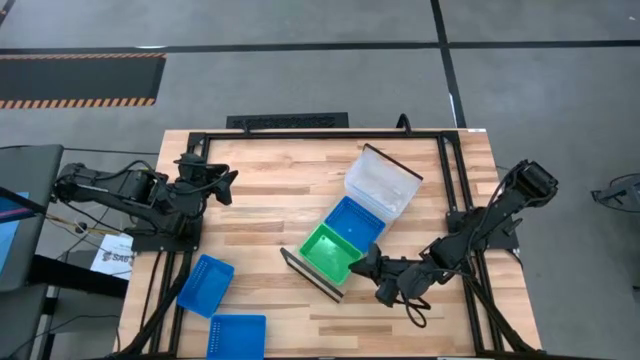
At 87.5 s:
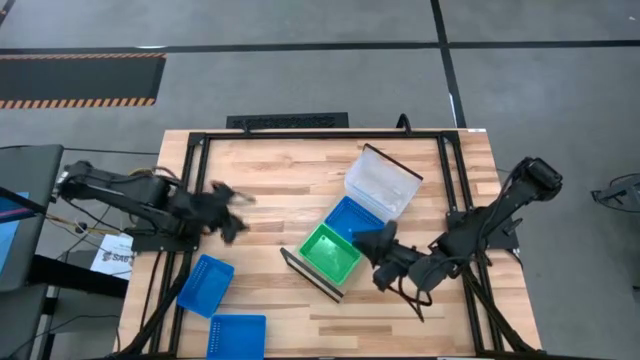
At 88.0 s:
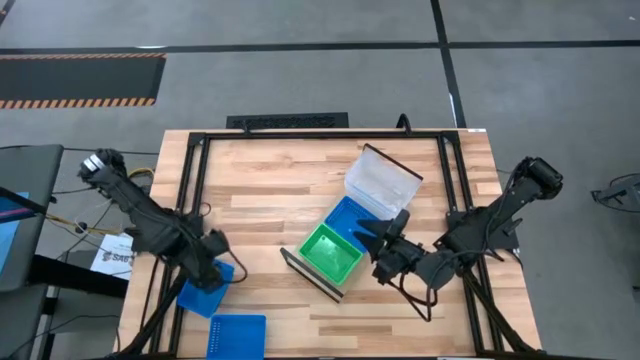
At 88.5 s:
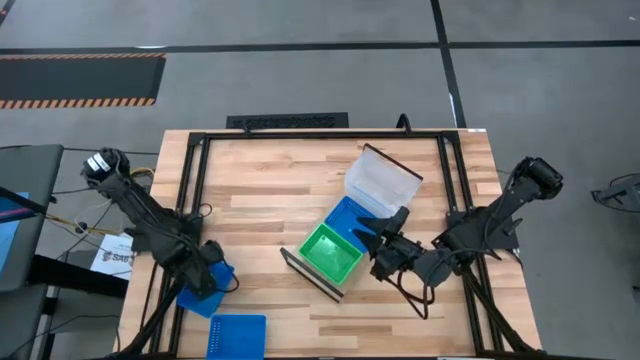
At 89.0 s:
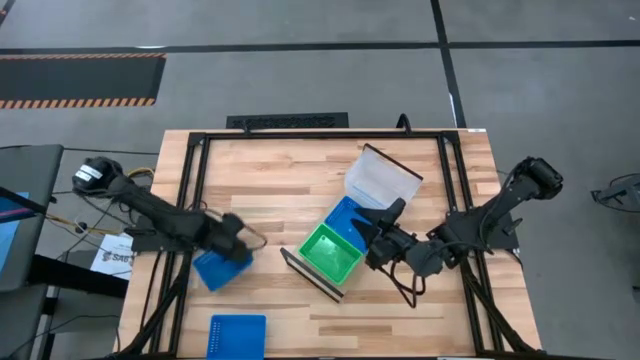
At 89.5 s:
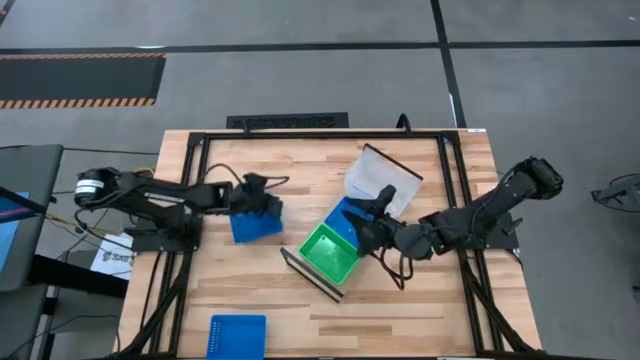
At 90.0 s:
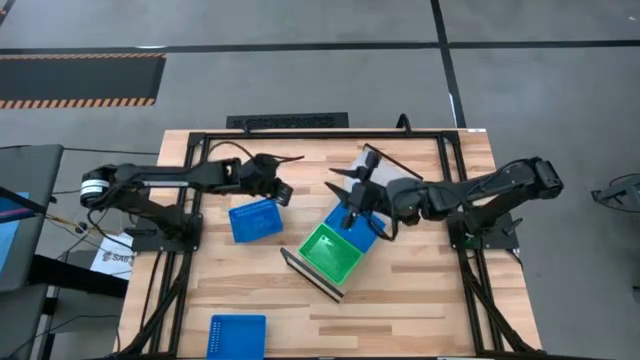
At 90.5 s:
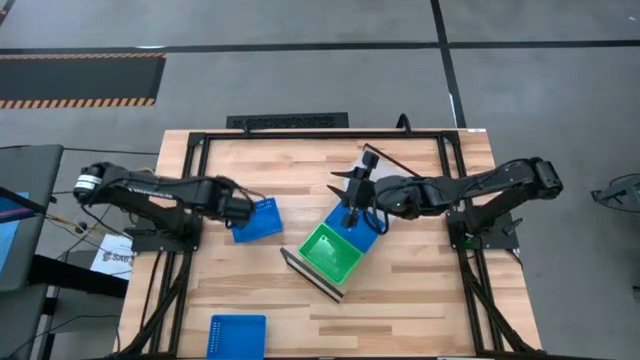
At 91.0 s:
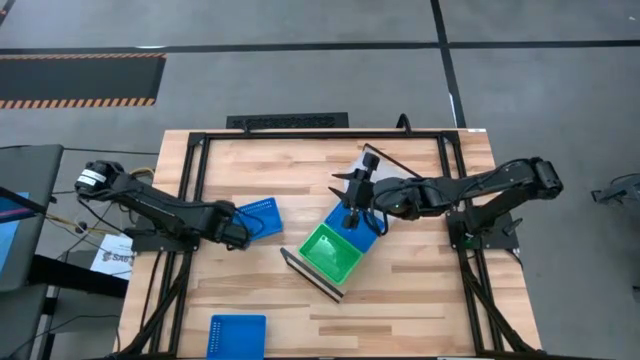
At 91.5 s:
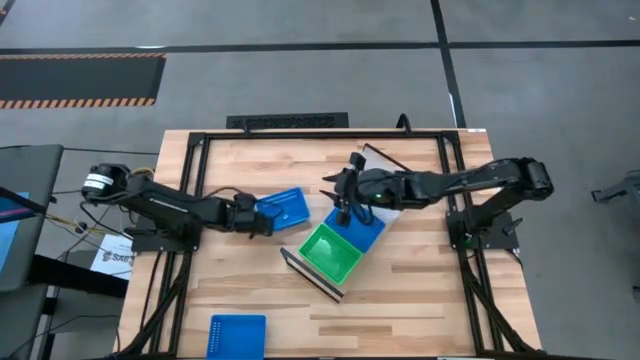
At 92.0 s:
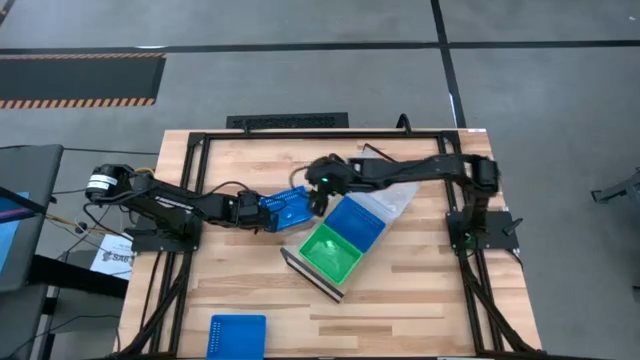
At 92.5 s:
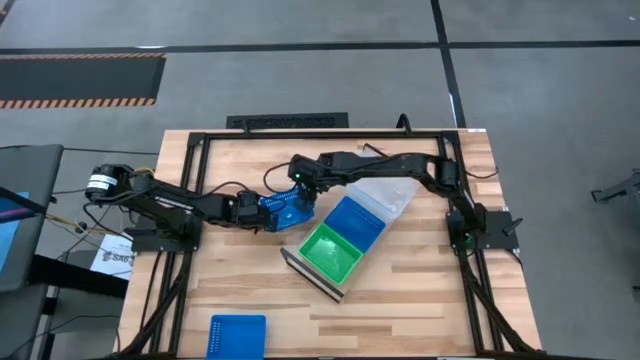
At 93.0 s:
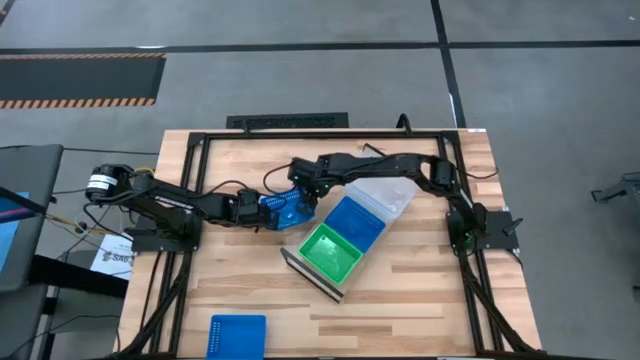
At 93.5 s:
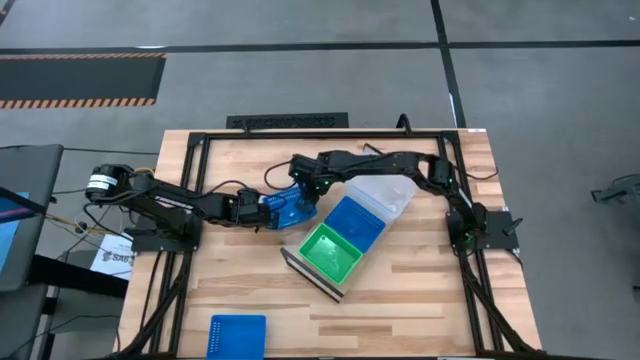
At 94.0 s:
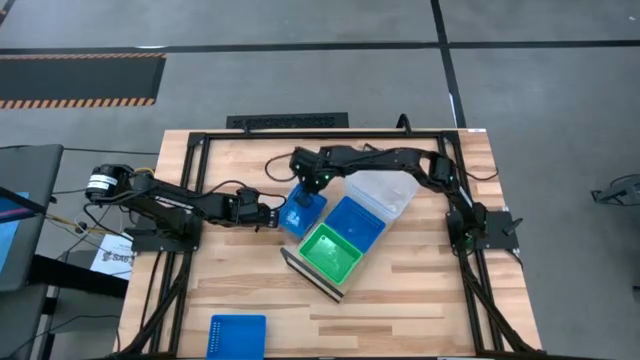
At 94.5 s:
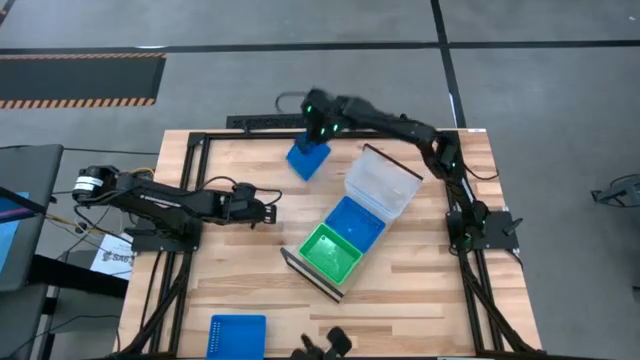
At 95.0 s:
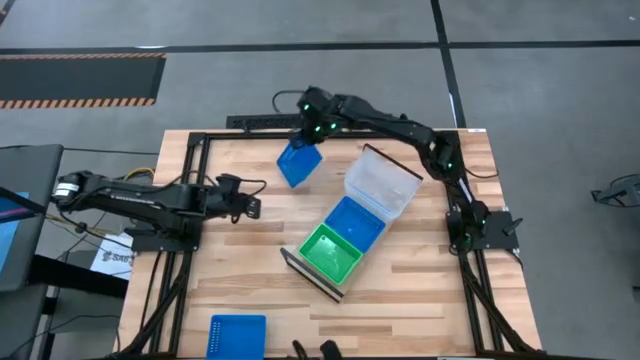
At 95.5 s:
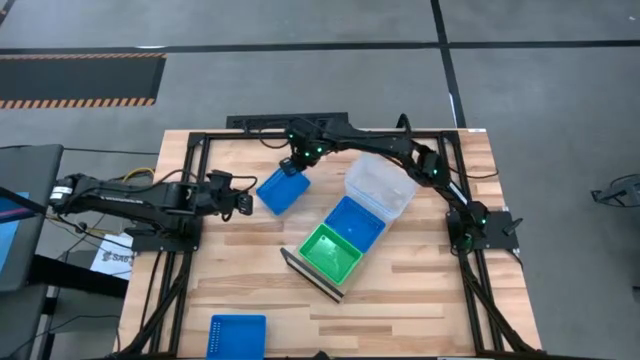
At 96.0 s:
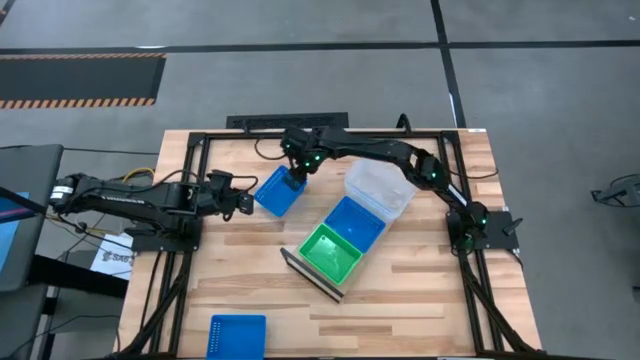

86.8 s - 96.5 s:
Task: Stack baskets on shelf by color
Stack the top blue bin on the other blue bin on the shelf

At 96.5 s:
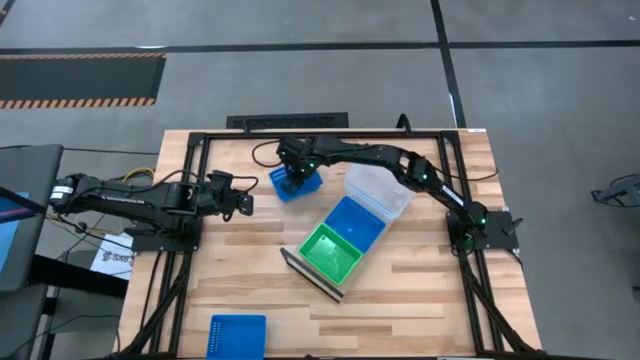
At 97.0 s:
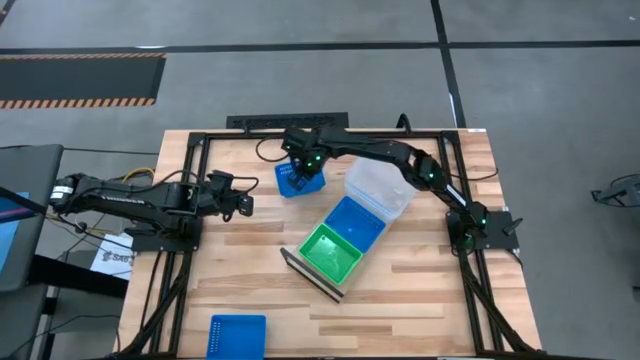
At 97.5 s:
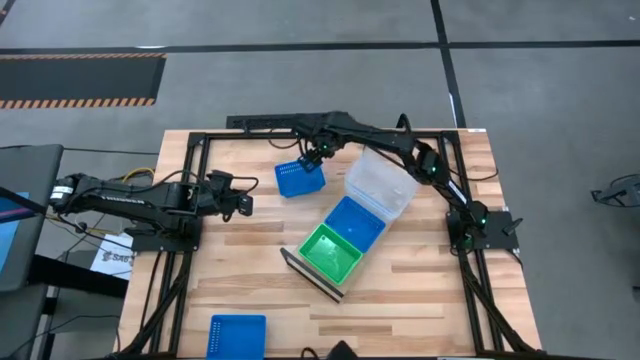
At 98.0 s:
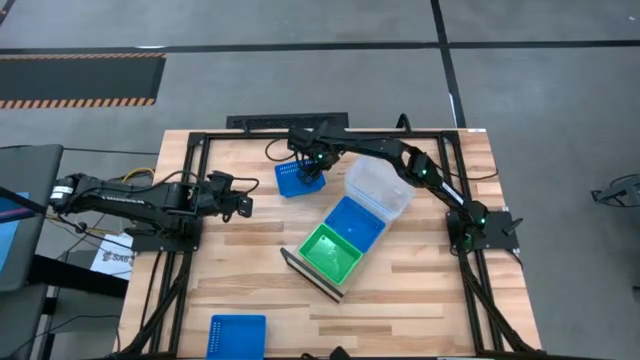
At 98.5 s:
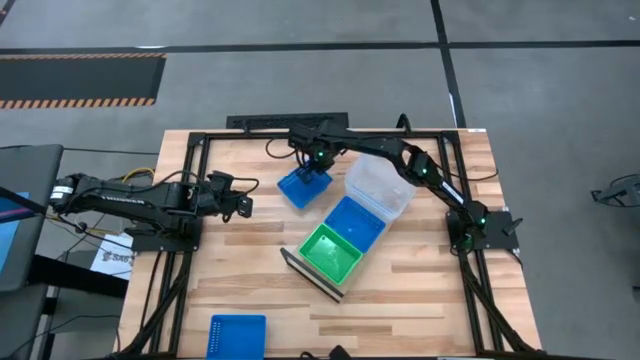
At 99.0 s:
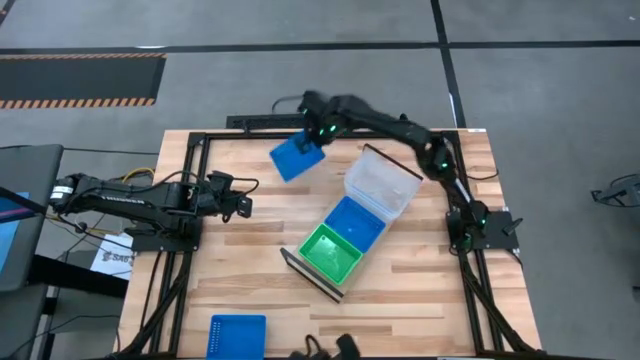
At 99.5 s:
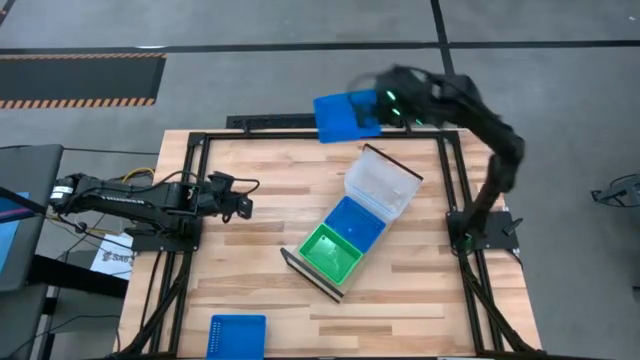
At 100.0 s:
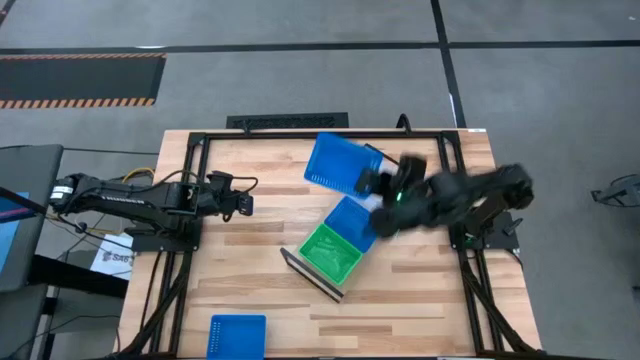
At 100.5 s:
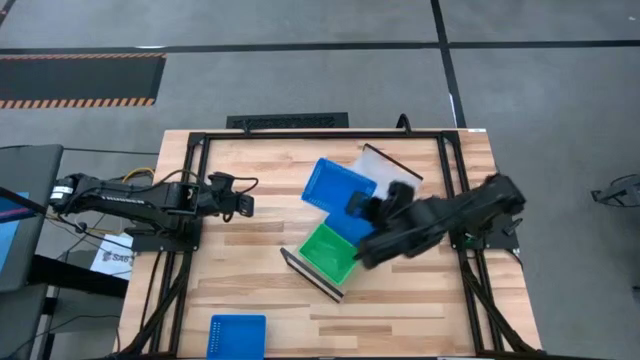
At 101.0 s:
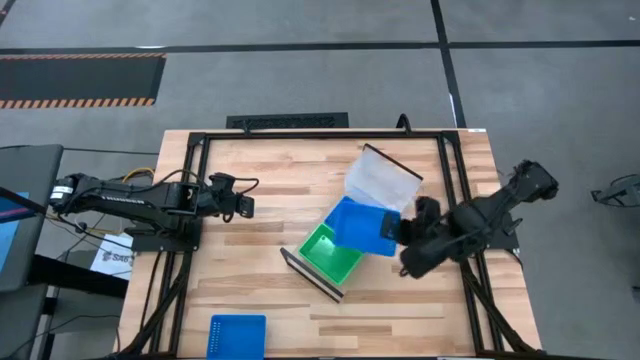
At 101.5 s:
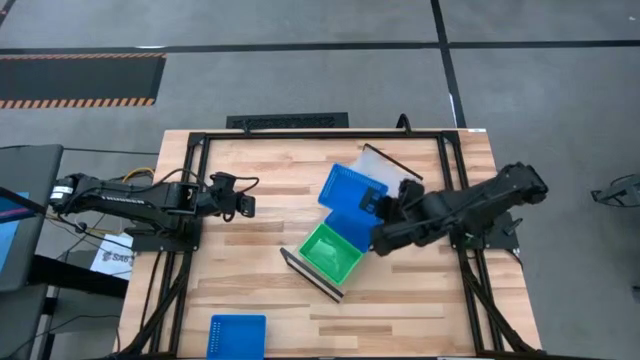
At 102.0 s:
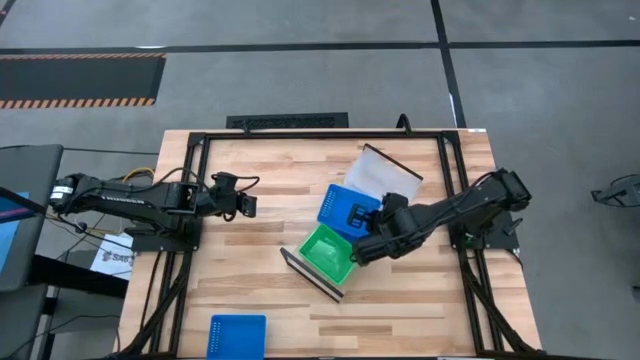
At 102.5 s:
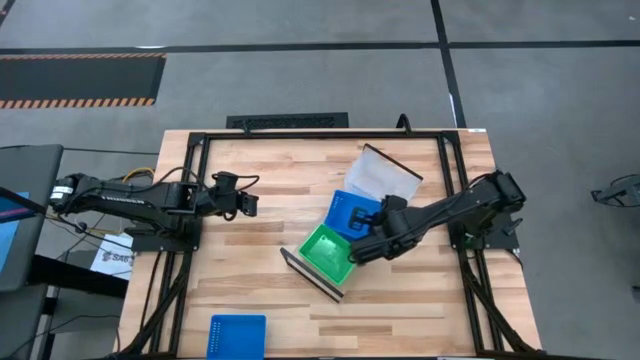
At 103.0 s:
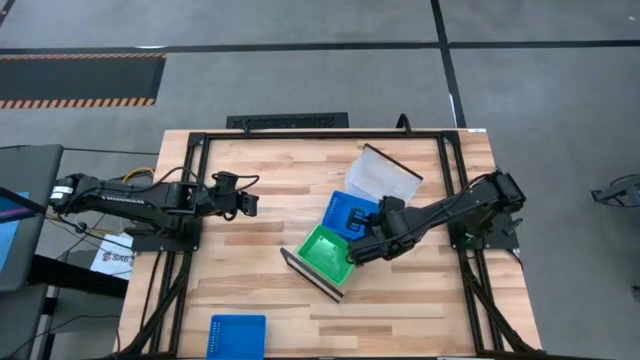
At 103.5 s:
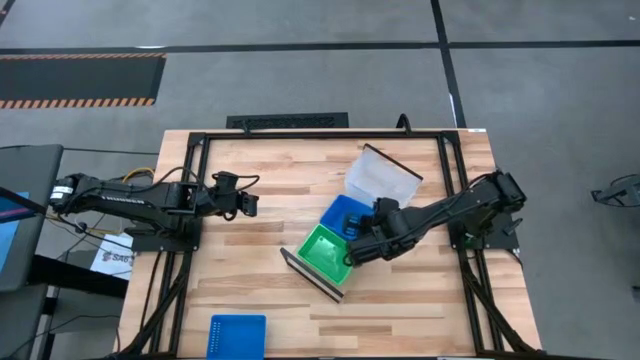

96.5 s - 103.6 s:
Stack the top blue bin on the other blue bin on the shelf

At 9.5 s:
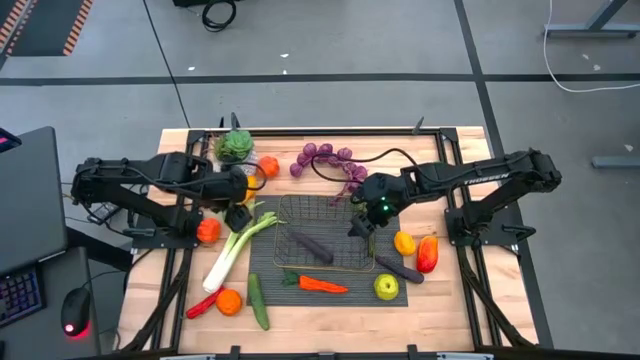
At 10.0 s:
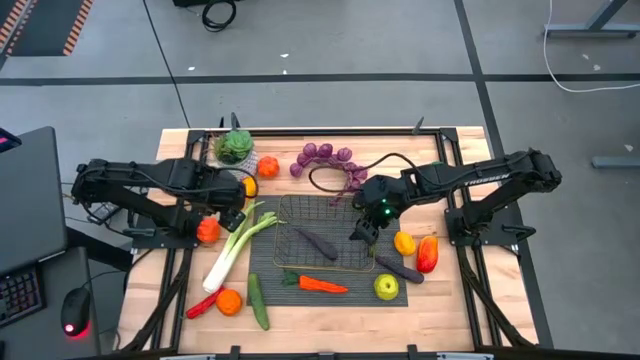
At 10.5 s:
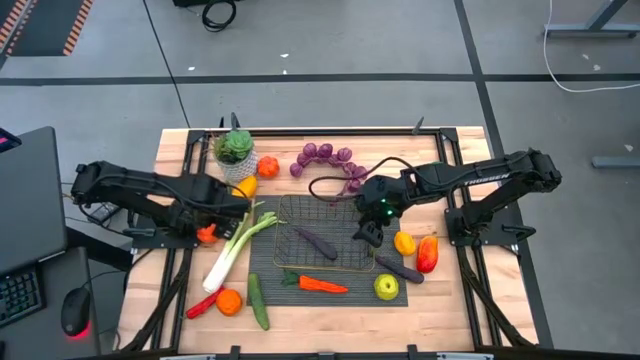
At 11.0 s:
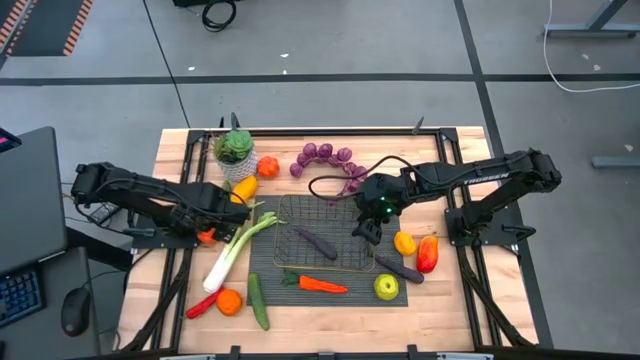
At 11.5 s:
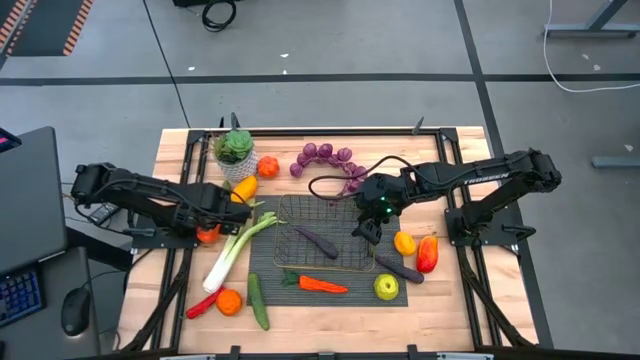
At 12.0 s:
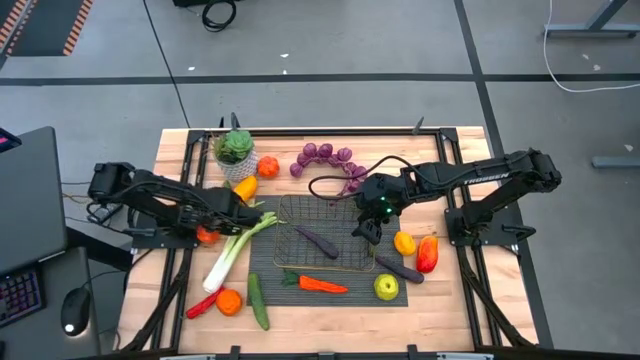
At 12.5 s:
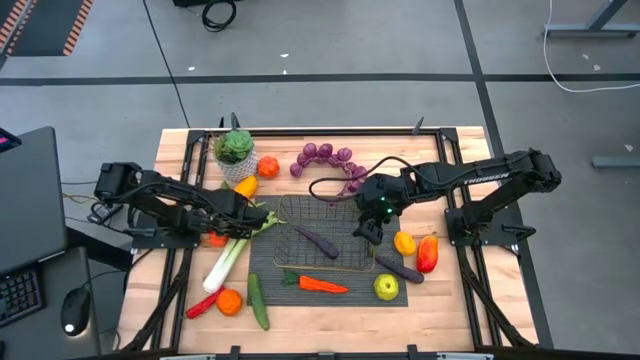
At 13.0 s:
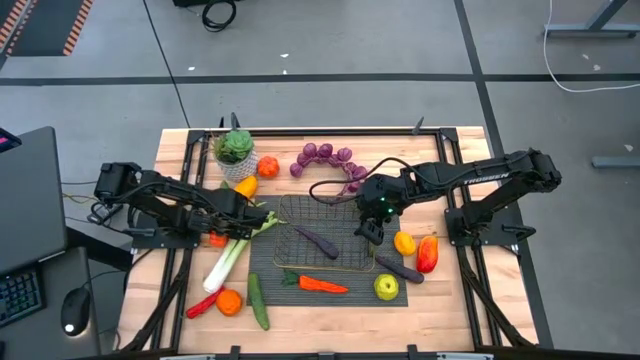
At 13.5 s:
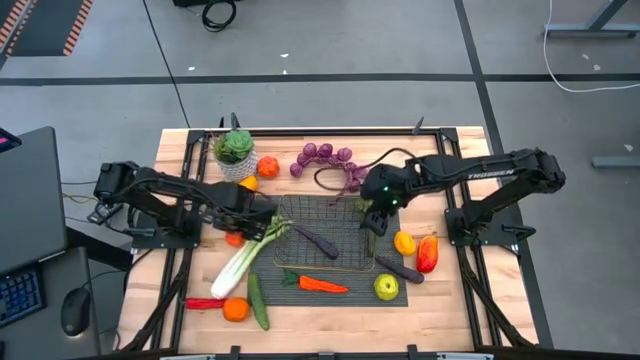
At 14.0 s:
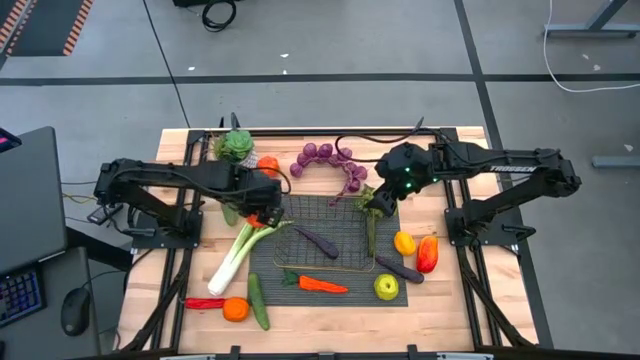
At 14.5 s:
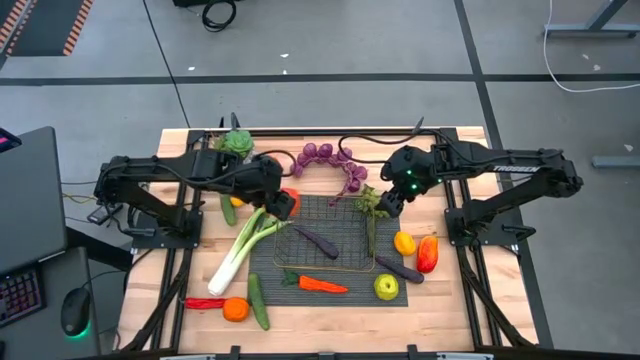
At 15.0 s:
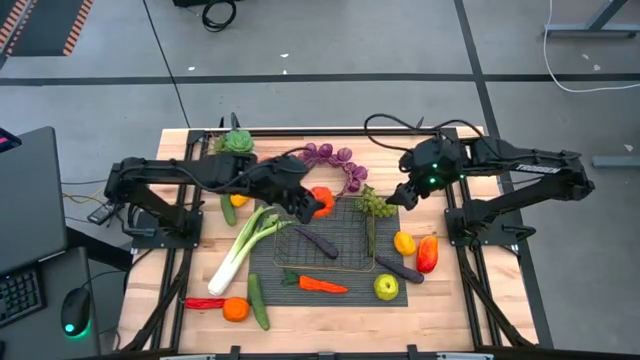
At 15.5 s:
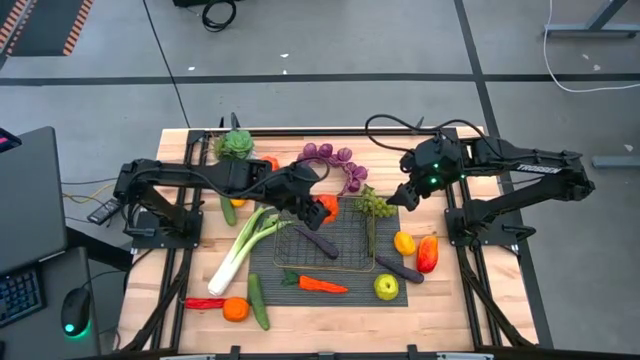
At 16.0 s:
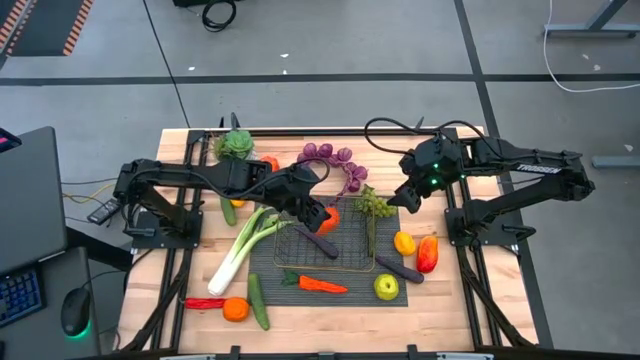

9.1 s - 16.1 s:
Task: Build produce basket
Put the bottom orange pumpkin into the gold wire basket
